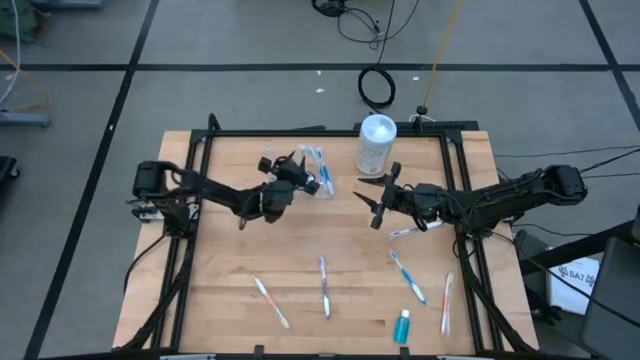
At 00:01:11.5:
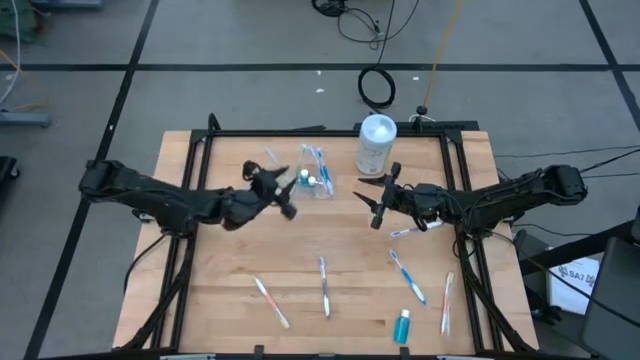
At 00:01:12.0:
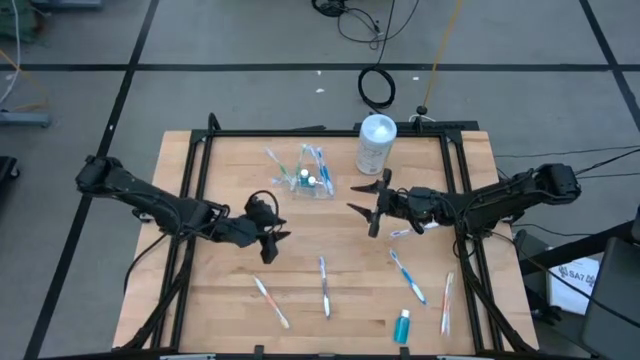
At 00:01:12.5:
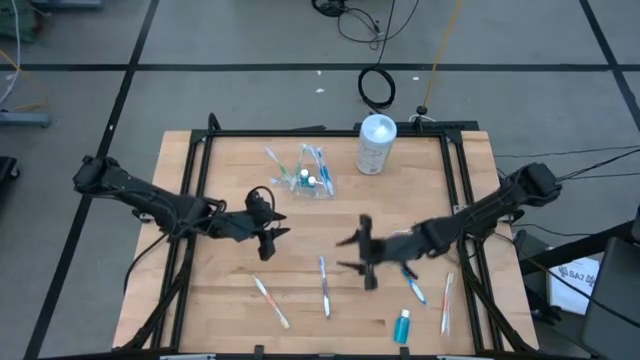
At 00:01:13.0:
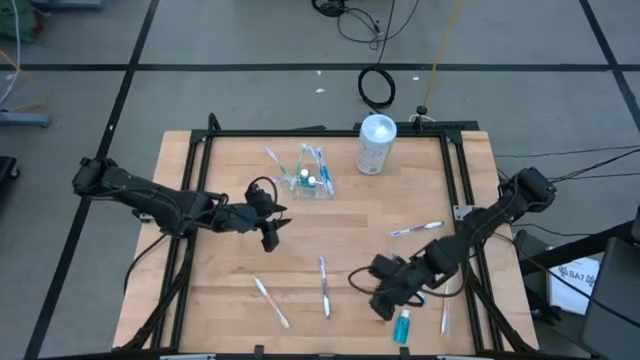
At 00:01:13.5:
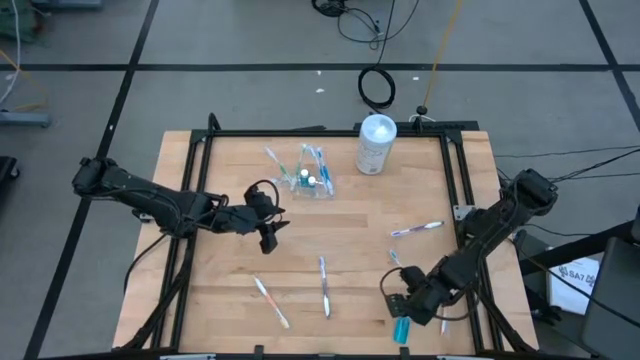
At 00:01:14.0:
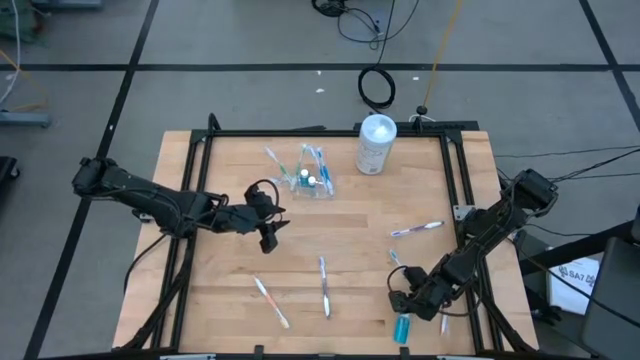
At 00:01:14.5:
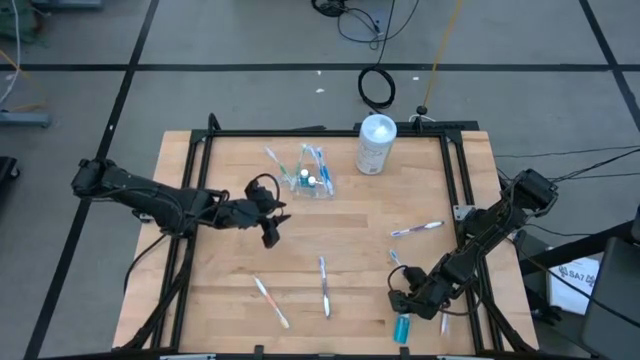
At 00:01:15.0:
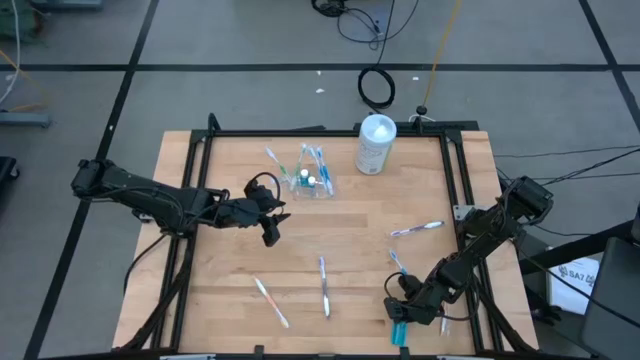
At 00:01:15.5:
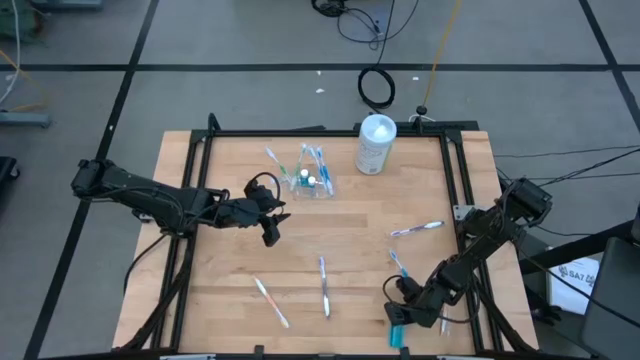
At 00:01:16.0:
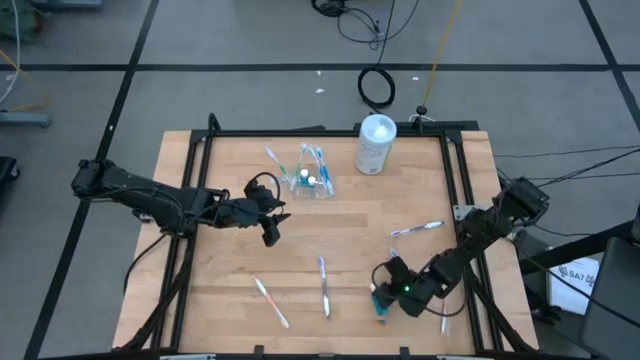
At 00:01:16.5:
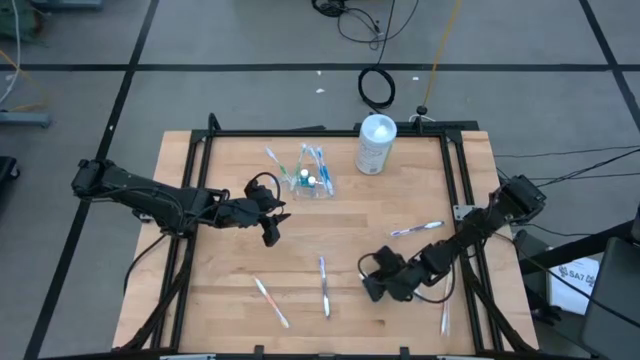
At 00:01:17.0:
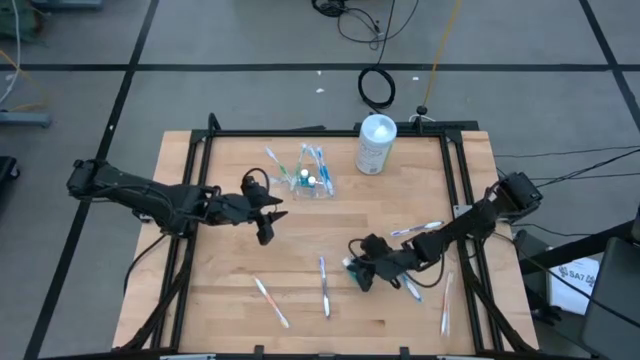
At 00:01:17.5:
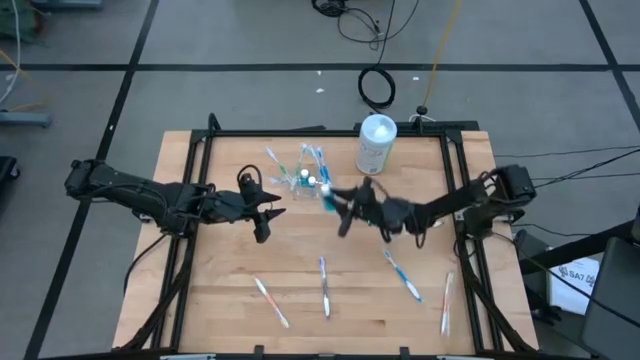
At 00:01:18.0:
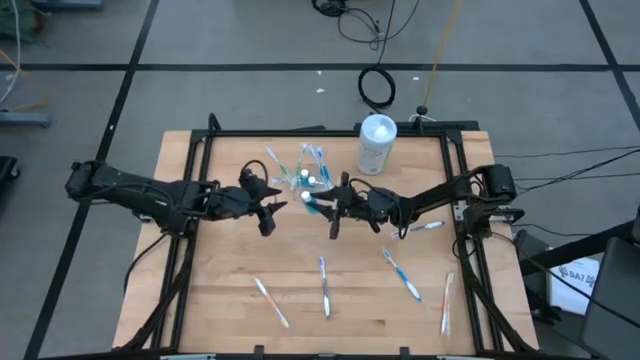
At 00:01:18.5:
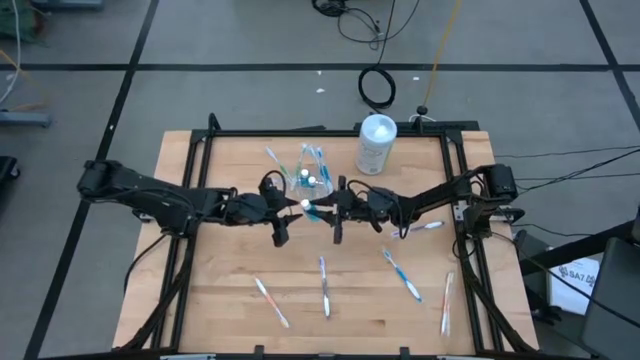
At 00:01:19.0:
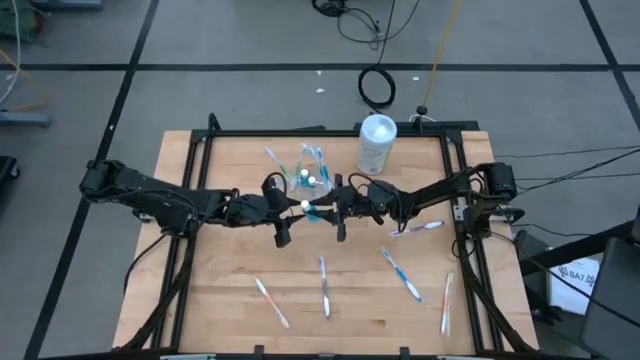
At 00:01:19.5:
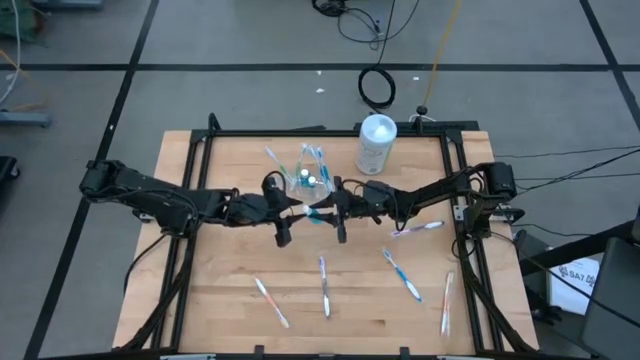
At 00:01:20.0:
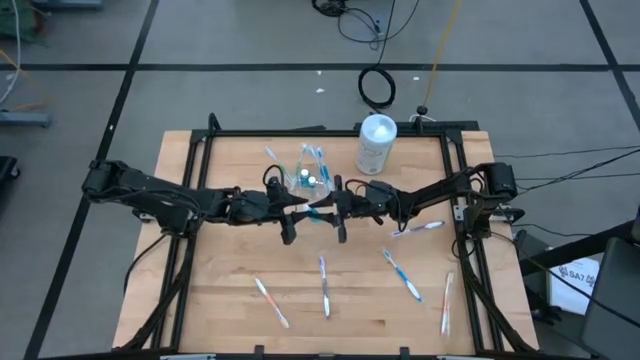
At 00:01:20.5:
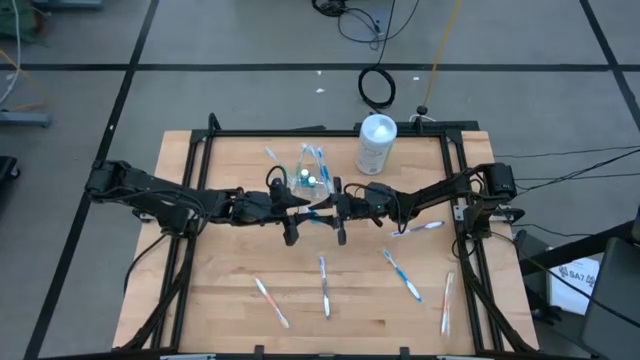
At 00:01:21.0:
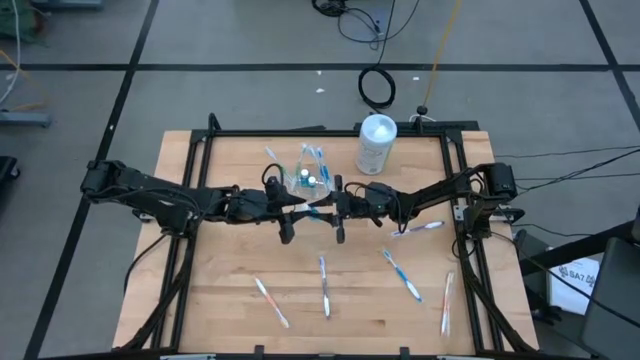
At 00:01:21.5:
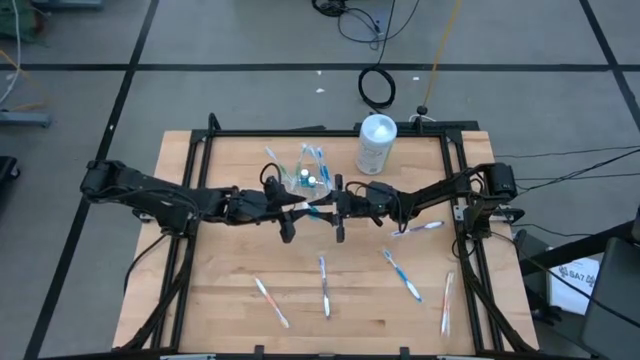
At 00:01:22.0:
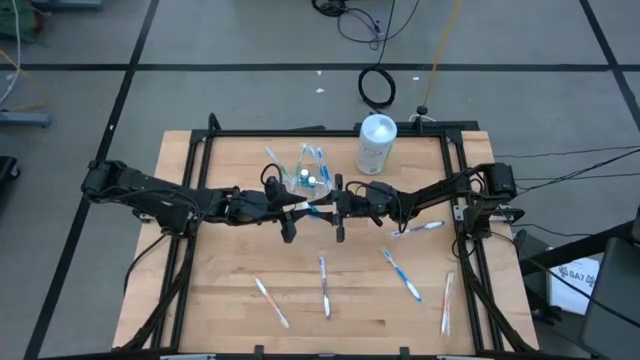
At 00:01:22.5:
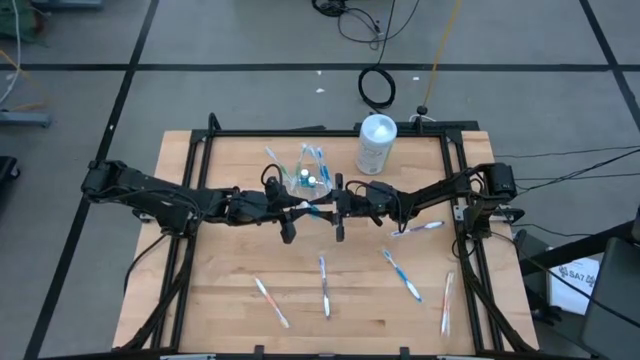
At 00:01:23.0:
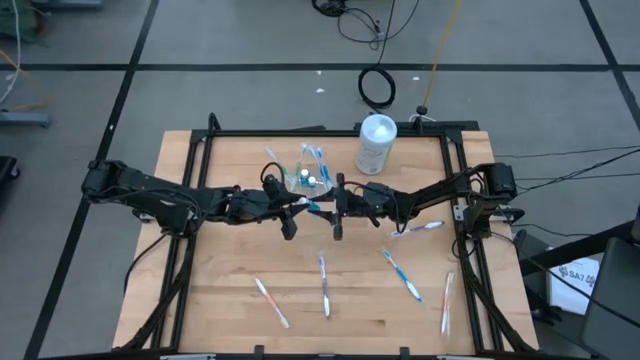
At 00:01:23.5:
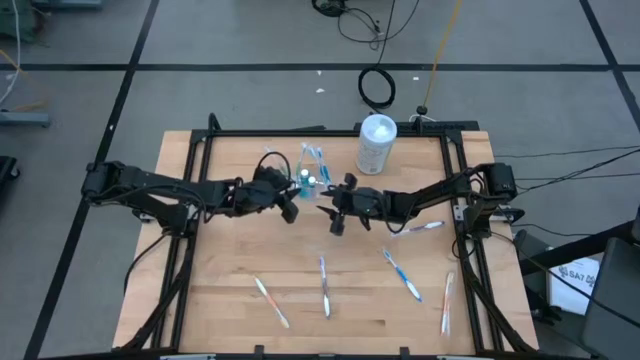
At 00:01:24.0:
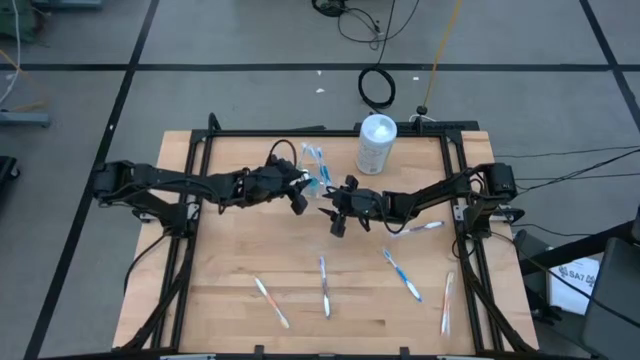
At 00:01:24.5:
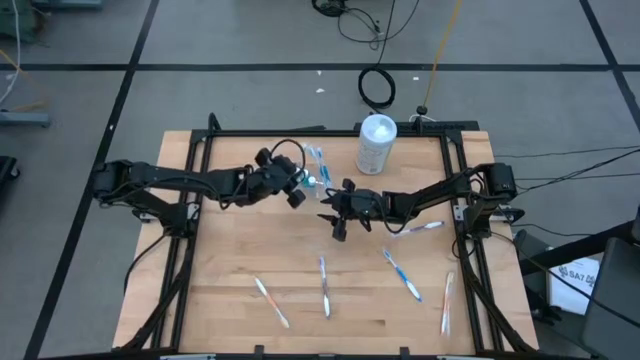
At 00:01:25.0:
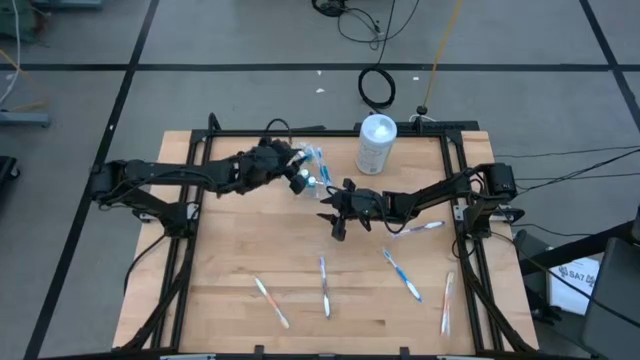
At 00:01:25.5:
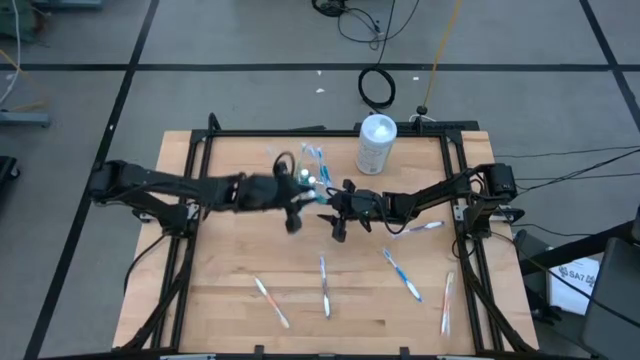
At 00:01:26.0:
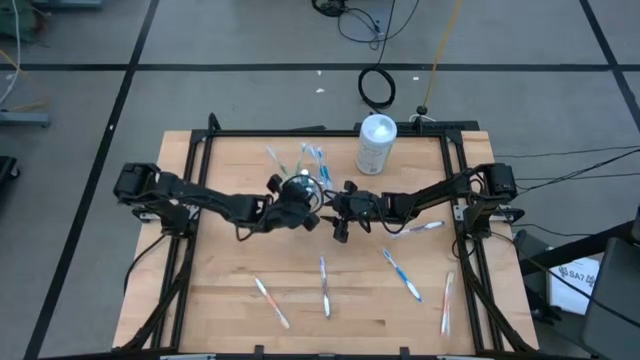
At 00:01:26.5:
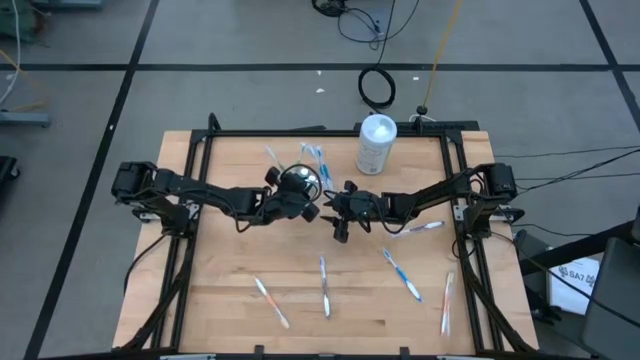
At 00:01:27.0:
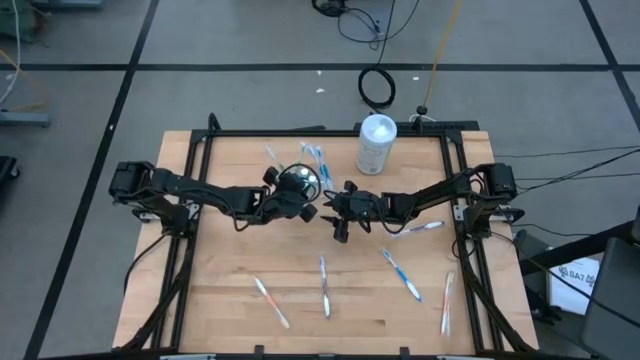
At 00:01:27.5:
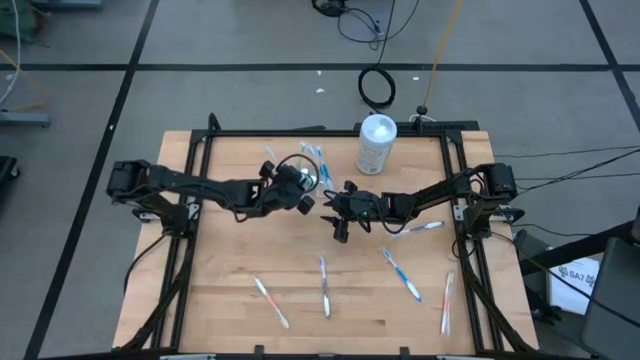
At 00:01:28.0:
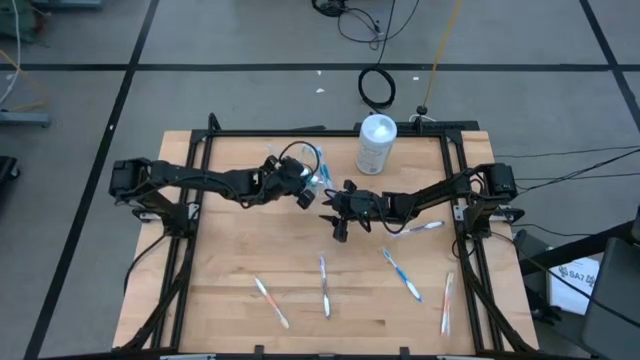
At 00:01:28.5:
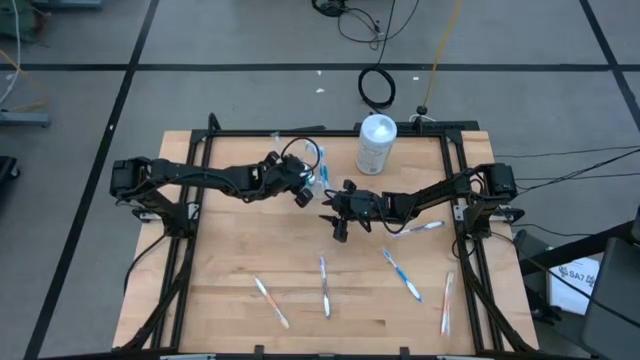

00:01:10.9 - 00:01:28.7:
Task: Pick & Place toothbrushing station
Put the mouthwash bottle in the middle compartment of the transparent organizer

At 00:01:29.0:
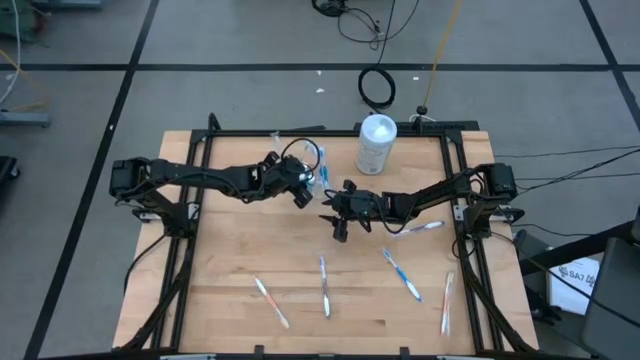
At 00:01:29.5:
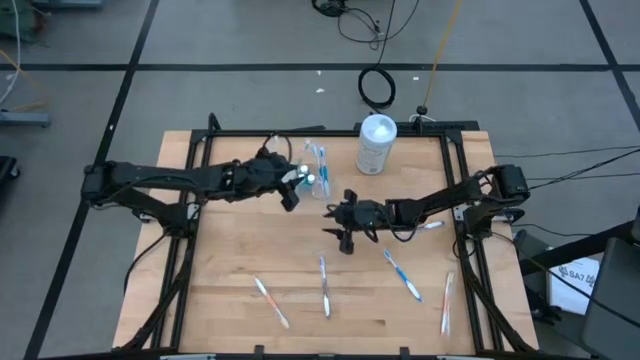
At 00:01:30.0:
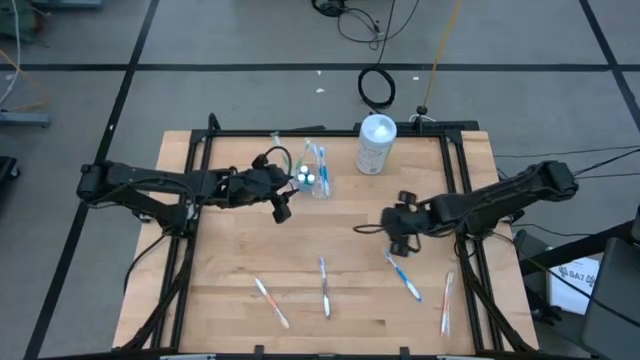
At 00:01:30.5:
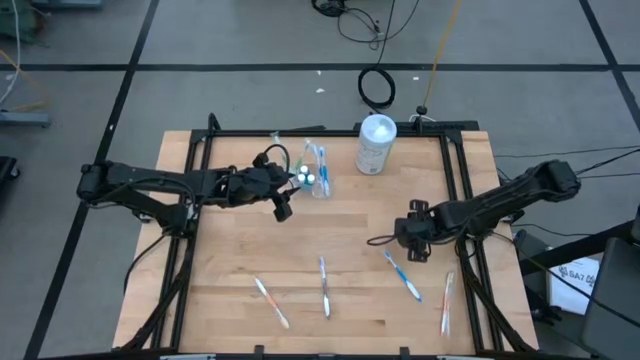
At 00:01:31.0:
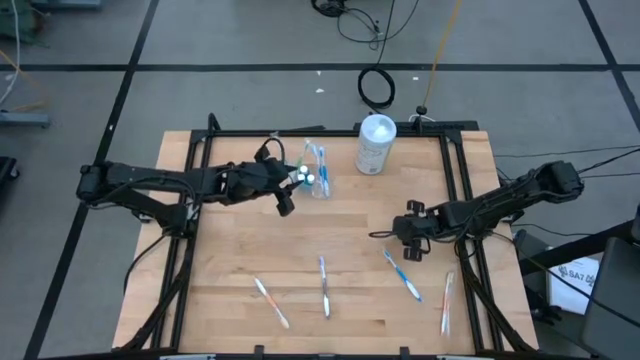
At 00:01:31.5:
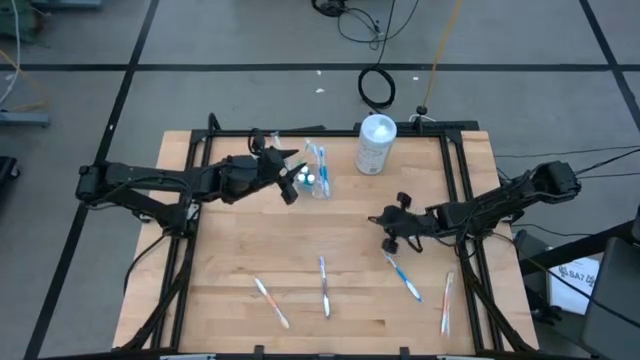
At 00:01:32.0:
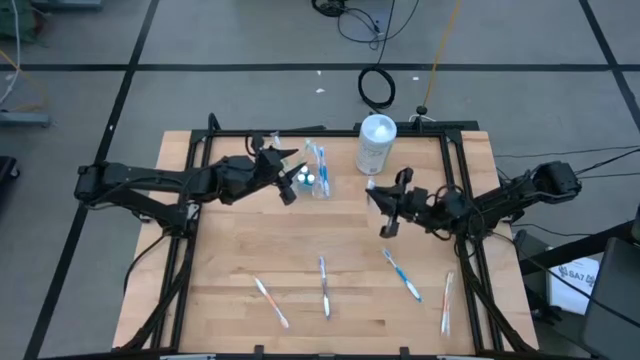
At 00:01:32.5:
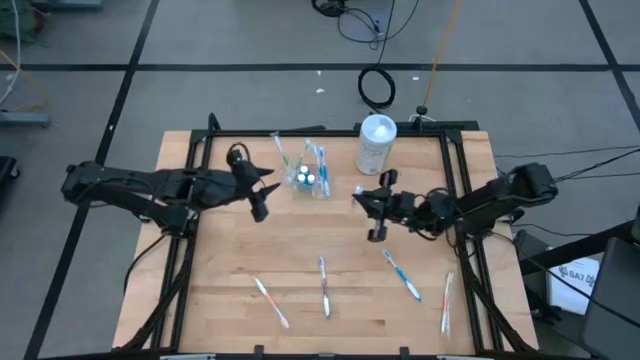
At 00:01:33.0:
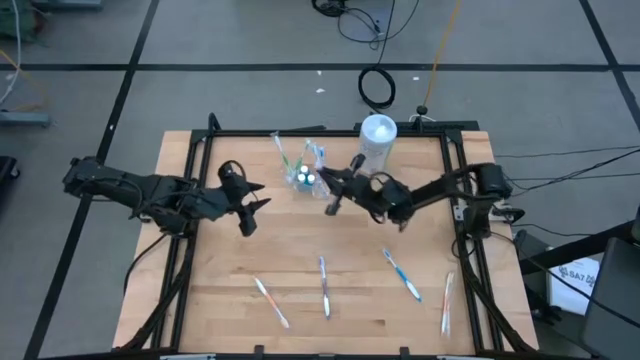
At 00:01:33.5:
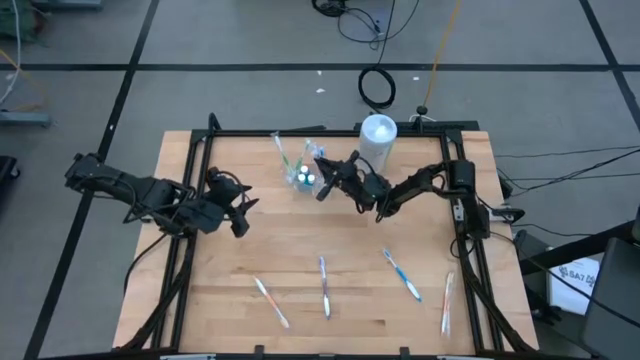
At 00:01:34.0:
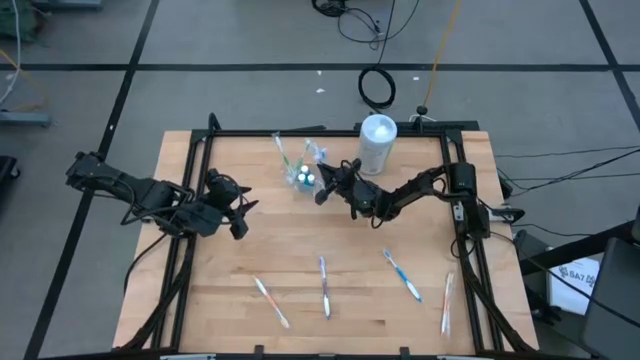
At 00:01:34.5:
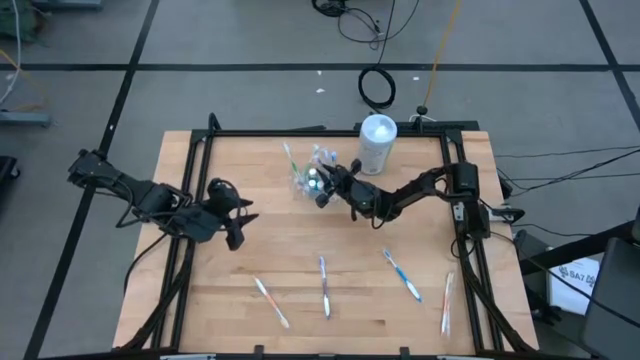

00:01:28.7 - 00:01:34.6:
Put the right purple toothbrush in the right compartment of the transparent organizer
